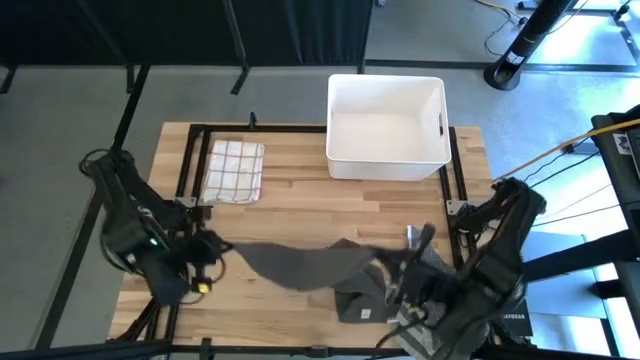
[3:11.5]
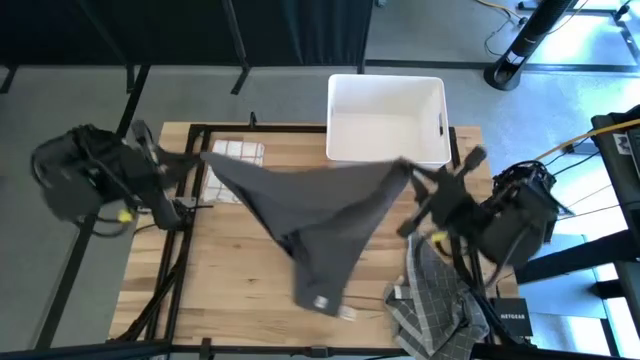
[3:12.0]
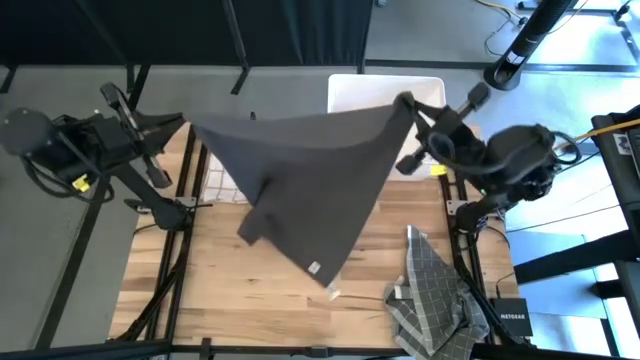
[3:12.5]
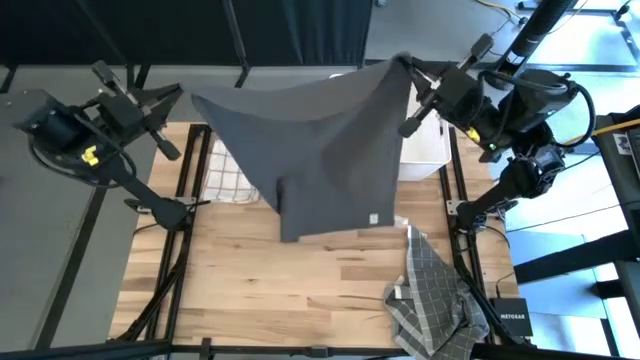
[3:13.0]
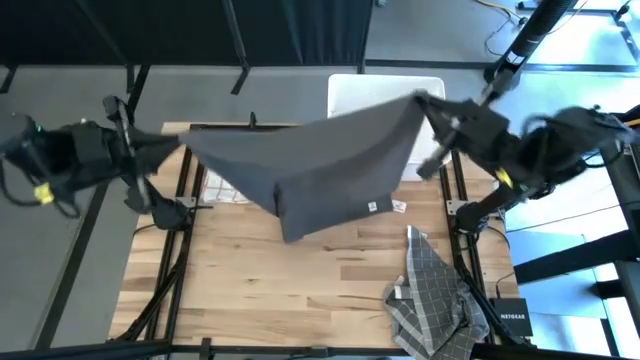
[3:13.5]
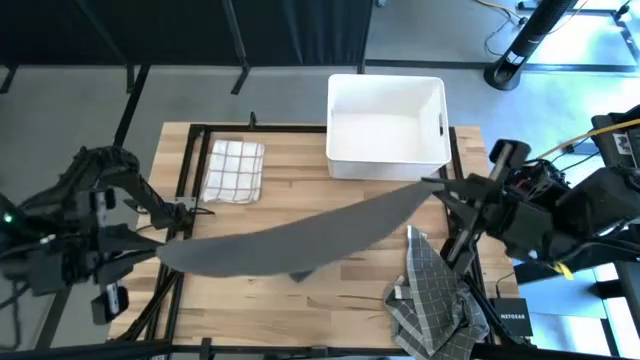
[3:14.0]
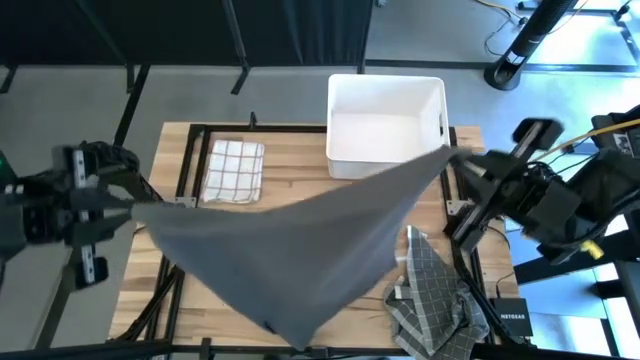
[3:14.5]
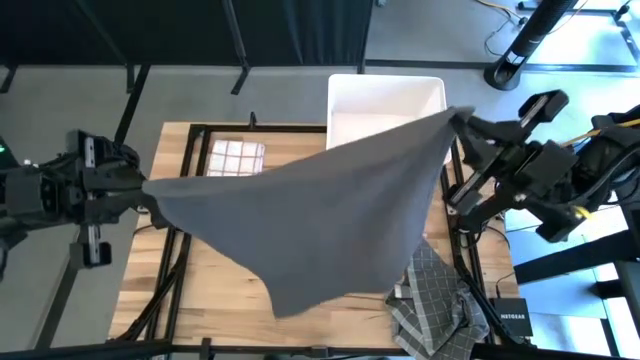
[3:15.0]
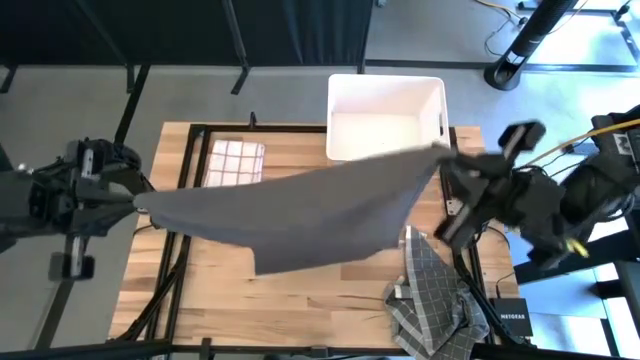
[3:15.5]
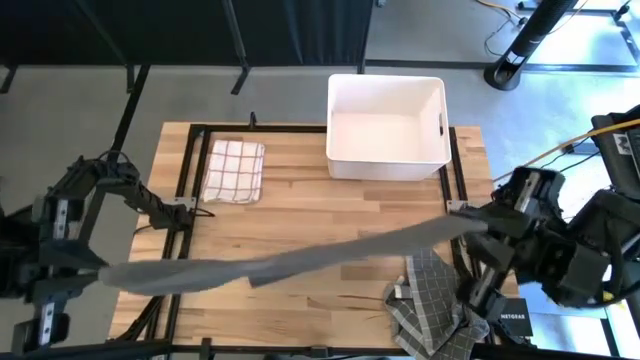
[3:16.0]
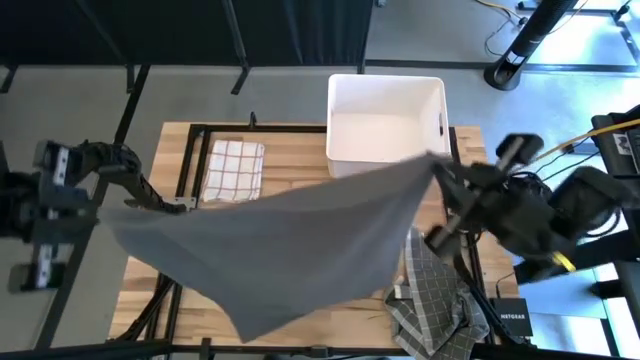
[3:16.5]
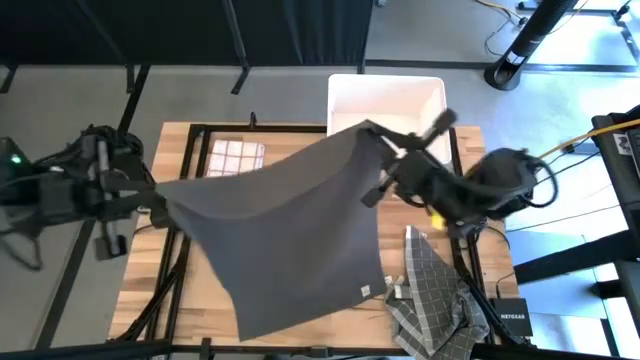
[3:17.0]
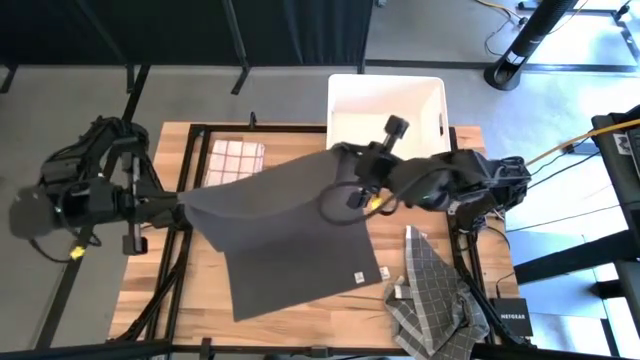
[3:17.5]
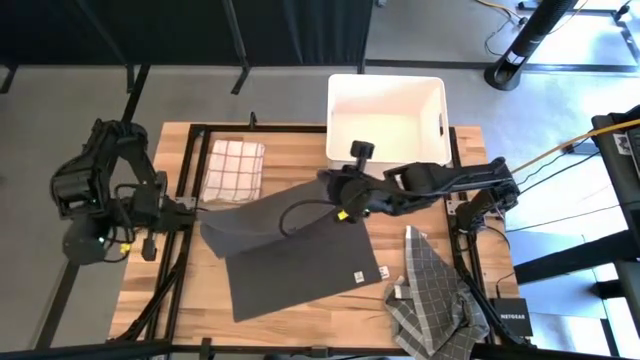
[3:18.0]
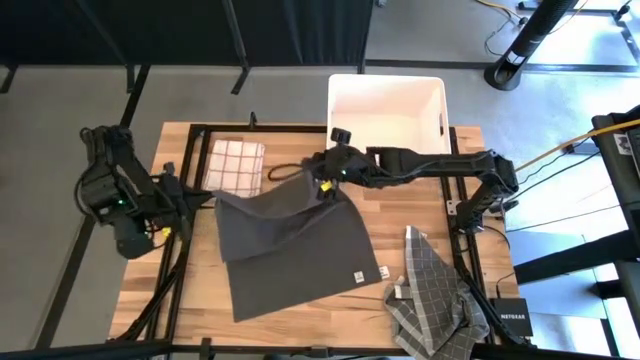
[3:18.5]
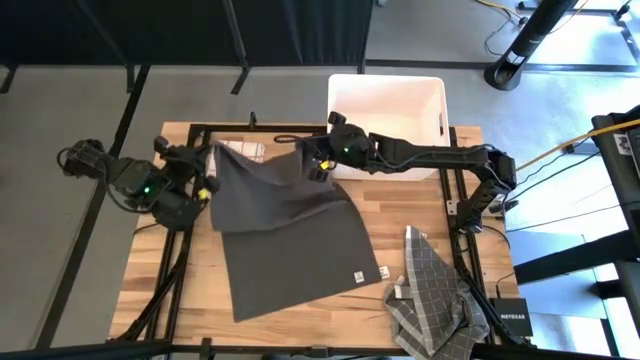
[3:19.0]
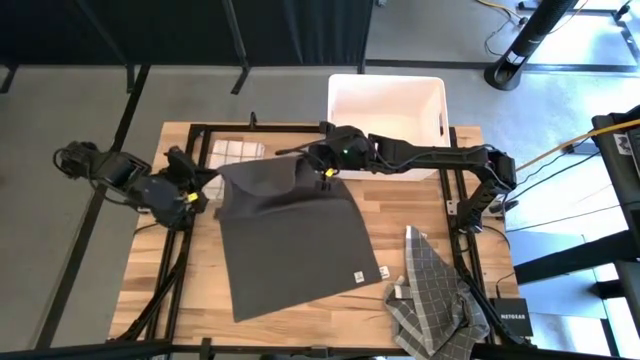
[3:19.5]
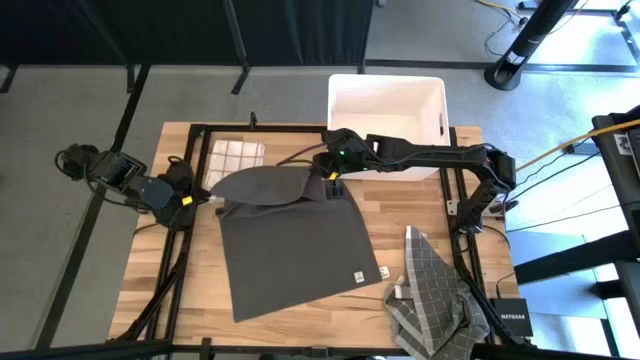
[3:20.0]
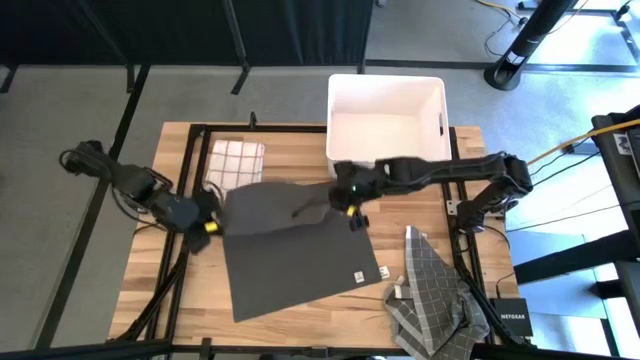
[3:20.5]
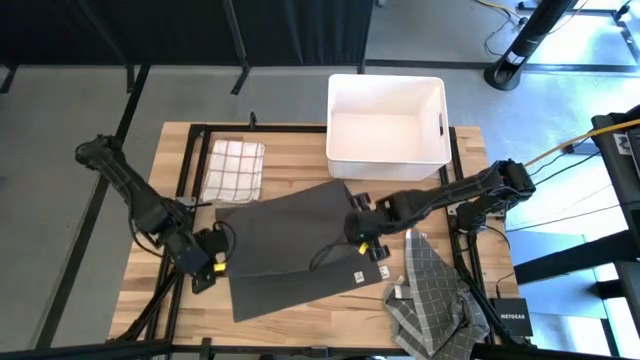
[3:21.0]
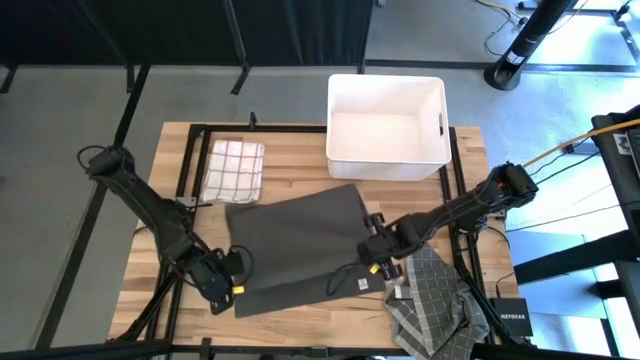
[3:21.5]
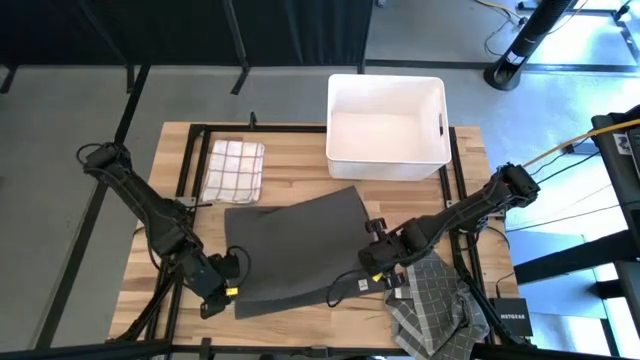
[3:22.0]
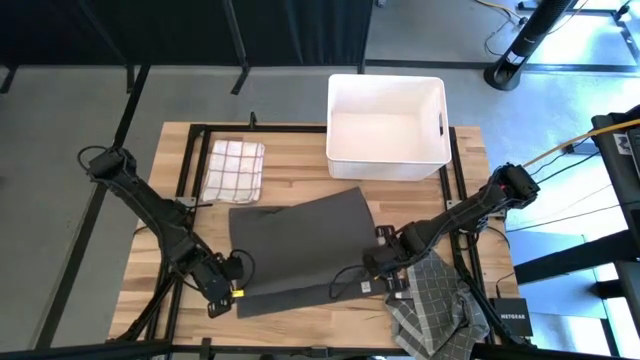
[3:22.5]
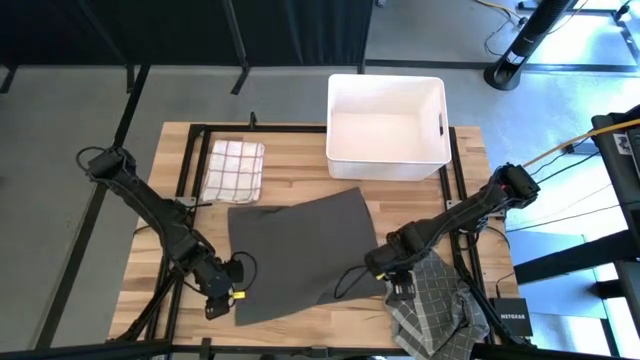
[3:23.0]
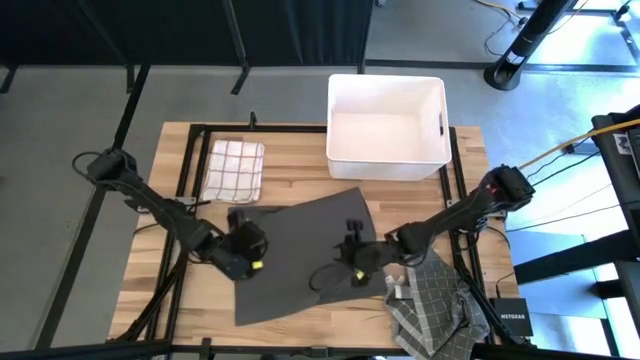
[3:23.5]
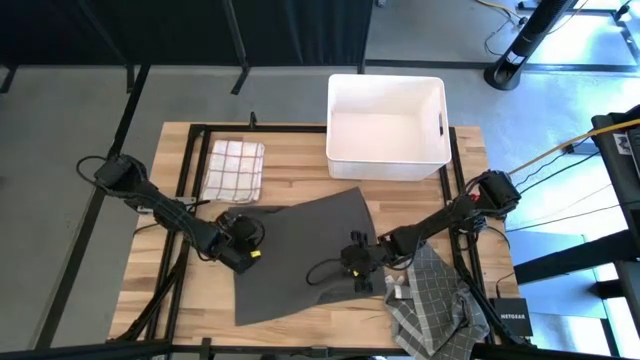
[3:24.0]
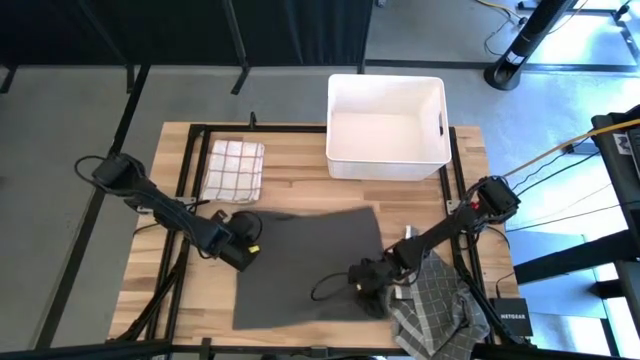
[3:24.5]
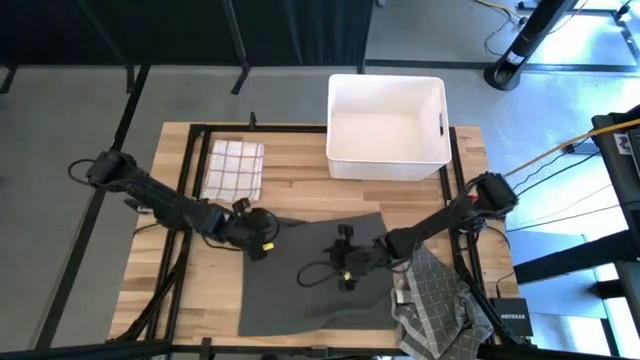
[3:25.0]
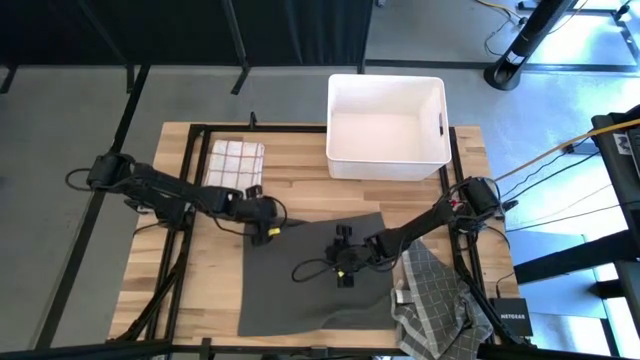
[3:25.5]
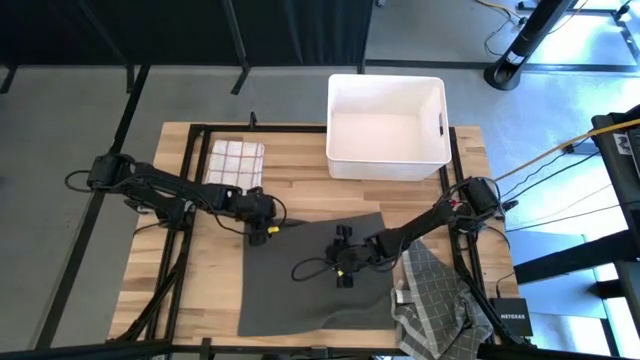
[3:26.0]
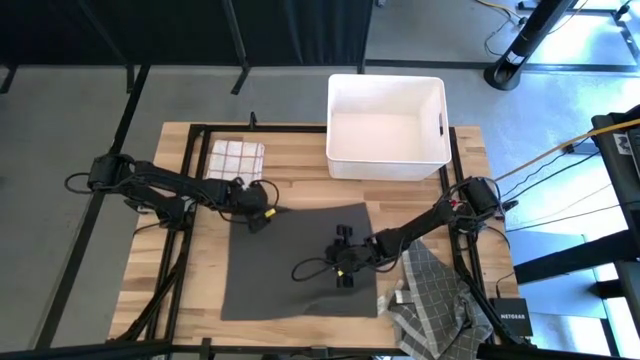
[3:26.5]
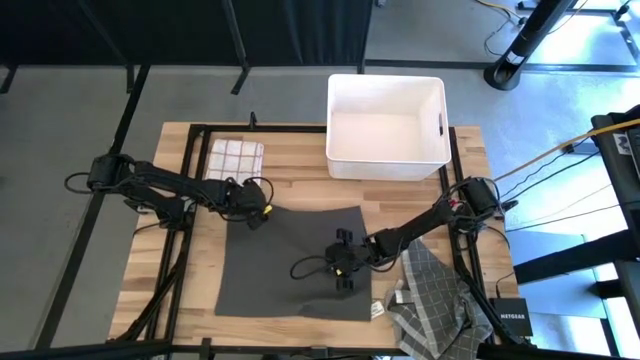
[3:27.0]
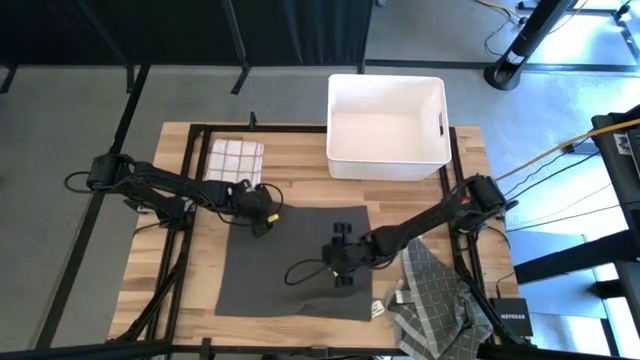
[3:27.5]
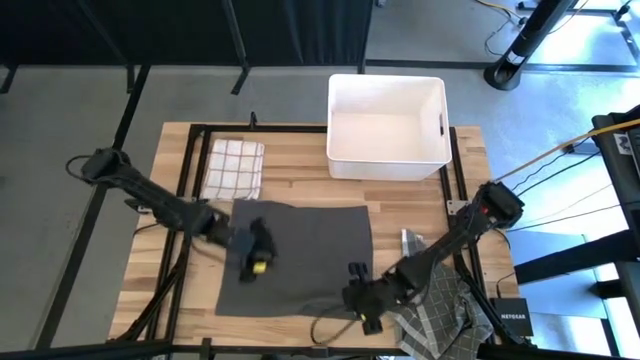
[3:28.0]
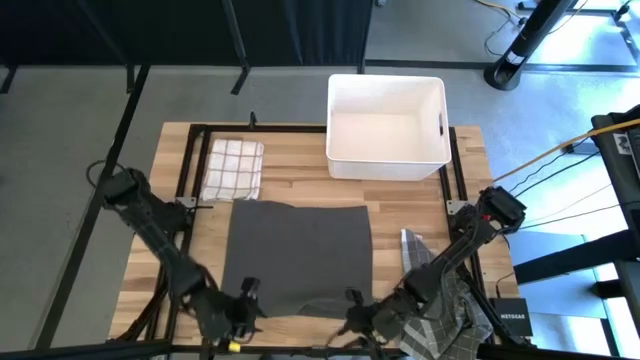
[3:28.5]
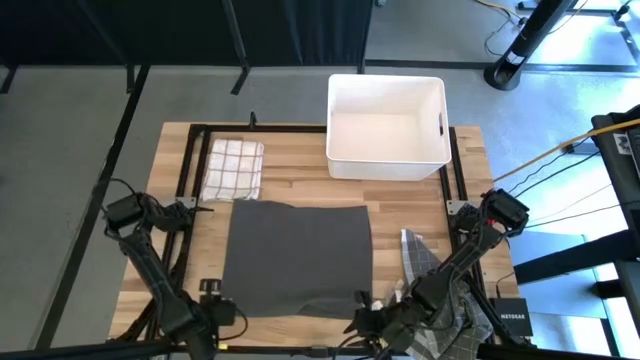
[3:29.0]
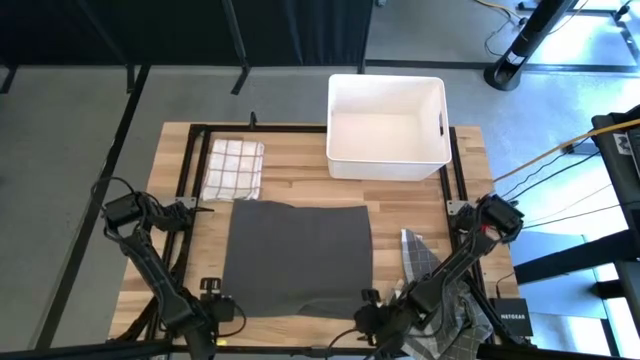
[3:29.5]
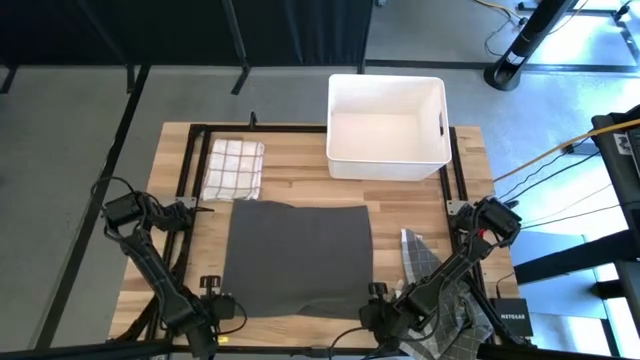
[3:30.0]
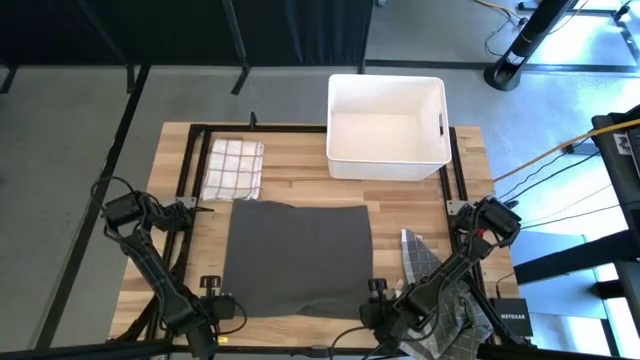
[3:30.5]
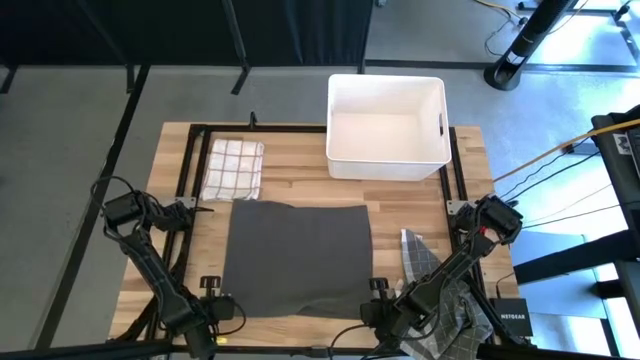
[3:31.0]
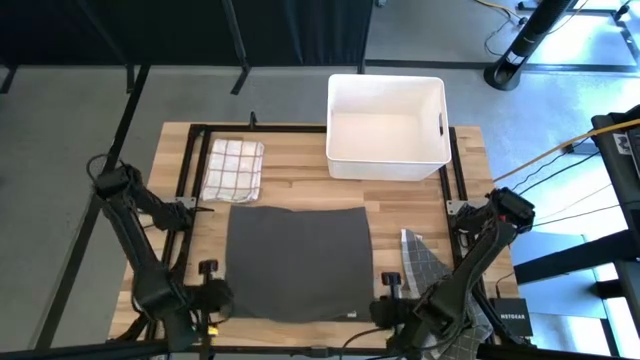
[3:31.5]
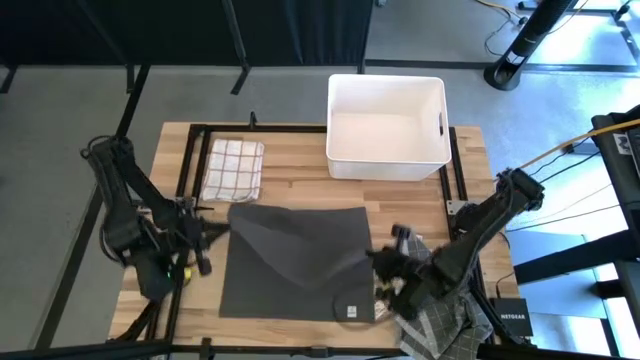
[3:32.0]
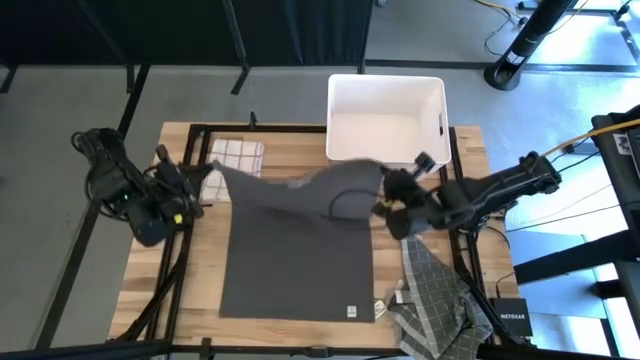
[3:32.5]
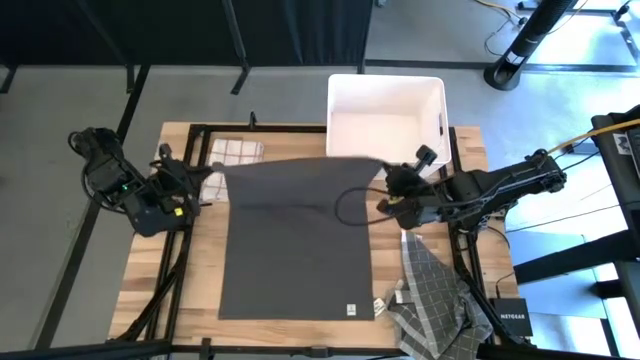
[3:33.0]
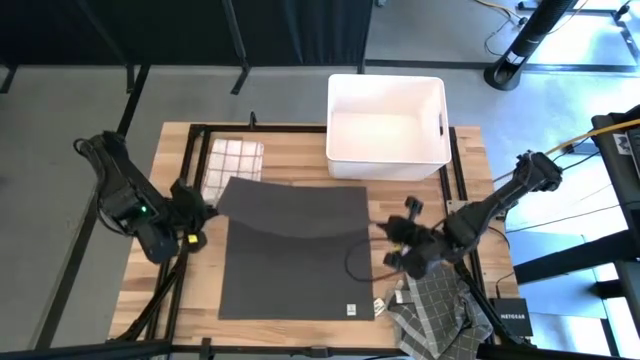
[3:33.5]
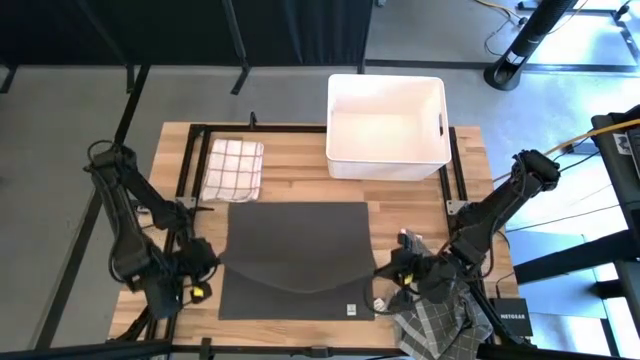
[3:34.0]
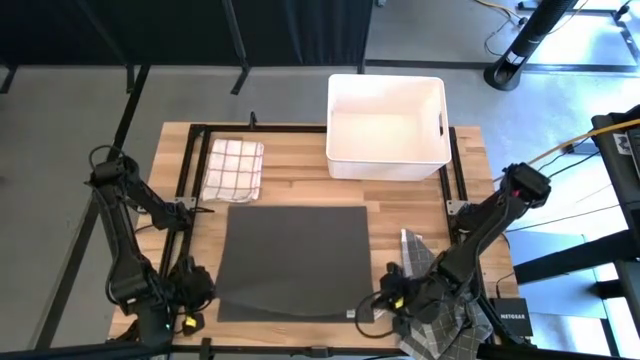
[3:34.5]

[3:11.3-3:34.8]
Task: Fold towel
Fold the grey towel and put beside the white towel
